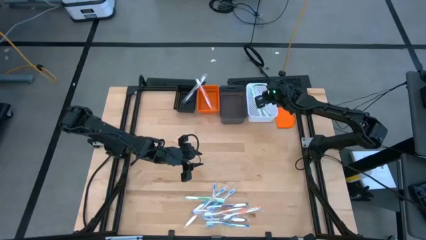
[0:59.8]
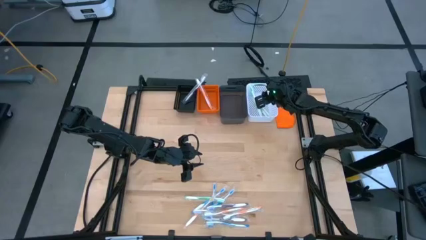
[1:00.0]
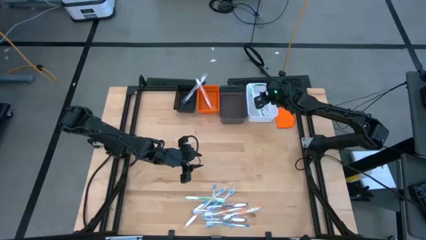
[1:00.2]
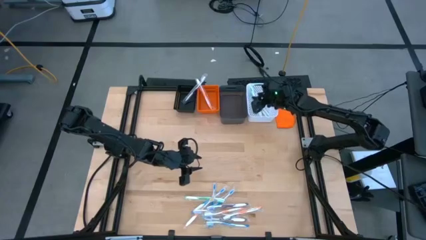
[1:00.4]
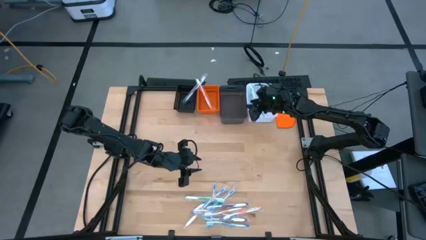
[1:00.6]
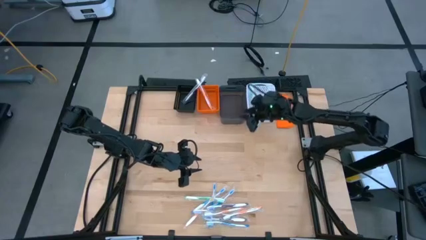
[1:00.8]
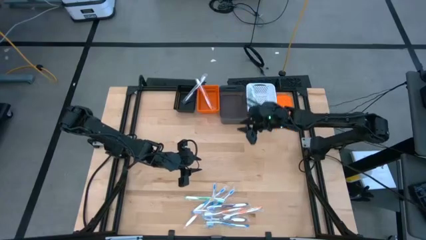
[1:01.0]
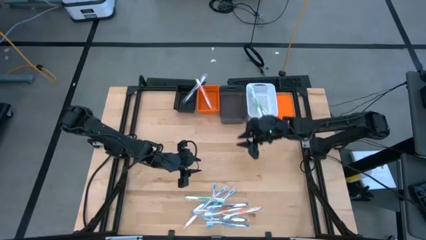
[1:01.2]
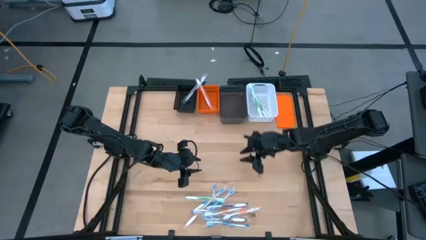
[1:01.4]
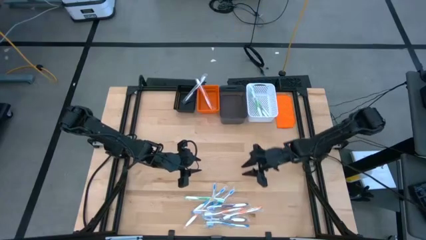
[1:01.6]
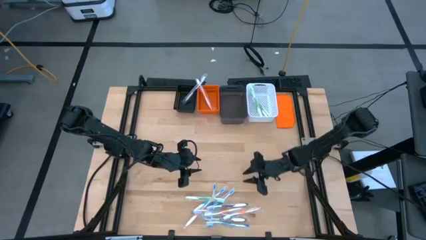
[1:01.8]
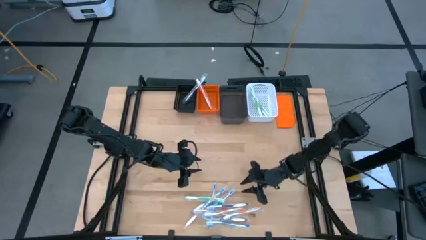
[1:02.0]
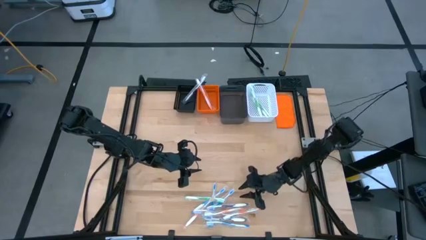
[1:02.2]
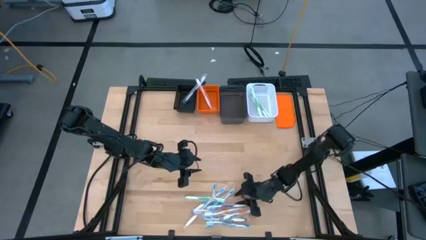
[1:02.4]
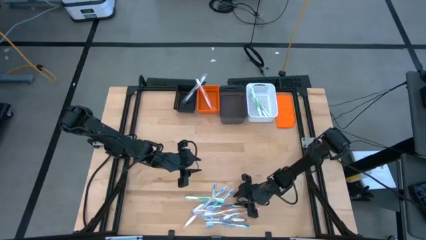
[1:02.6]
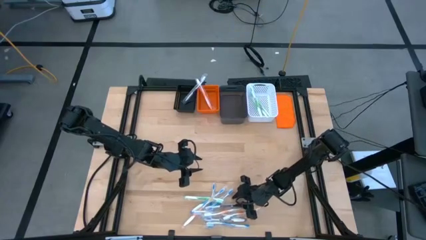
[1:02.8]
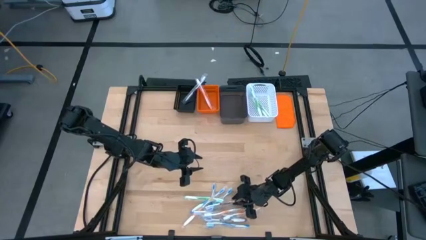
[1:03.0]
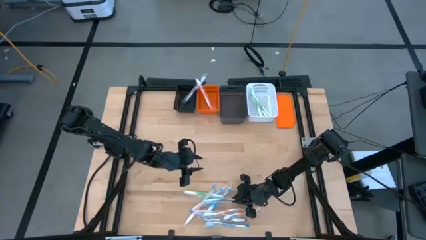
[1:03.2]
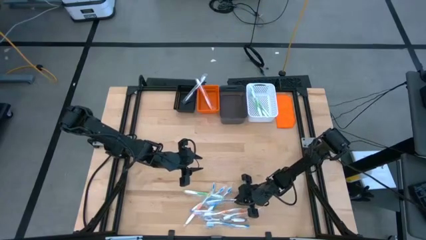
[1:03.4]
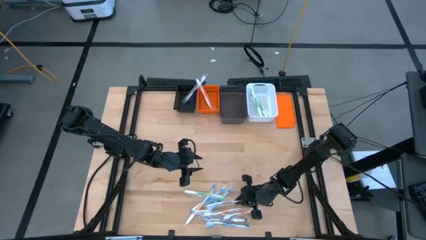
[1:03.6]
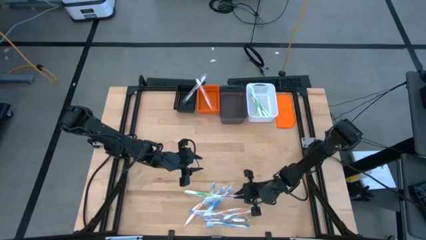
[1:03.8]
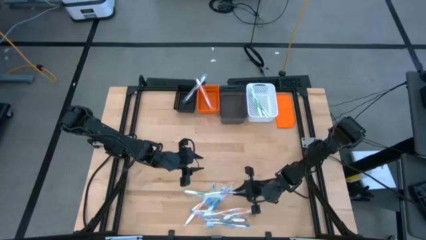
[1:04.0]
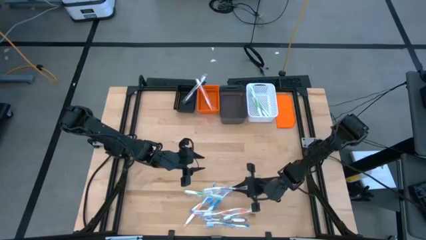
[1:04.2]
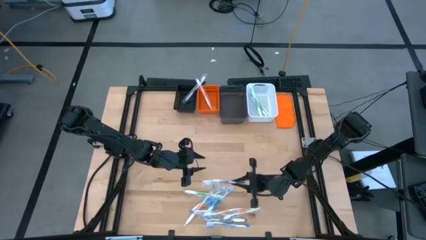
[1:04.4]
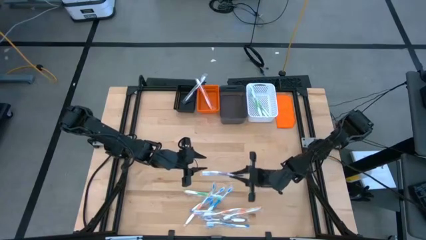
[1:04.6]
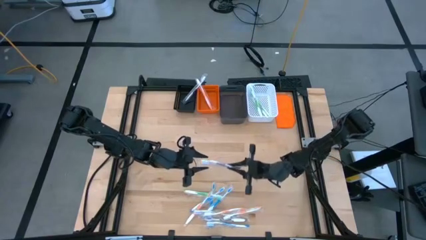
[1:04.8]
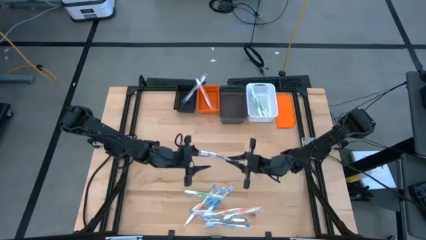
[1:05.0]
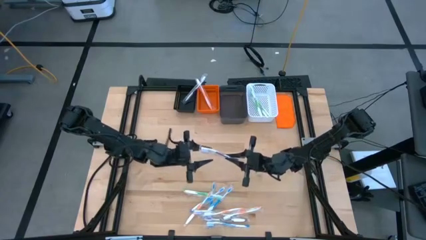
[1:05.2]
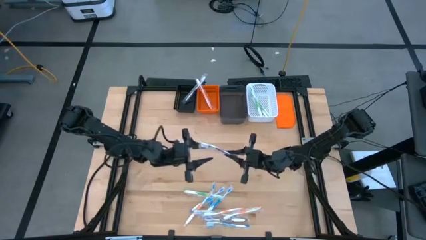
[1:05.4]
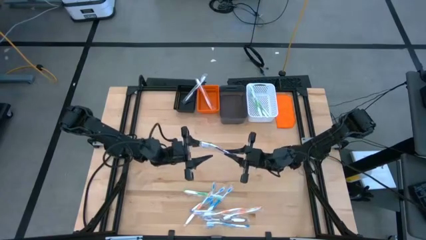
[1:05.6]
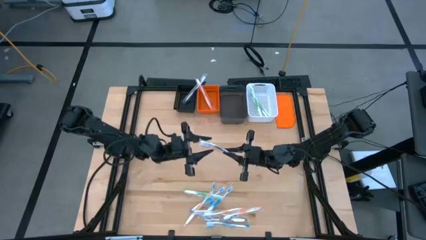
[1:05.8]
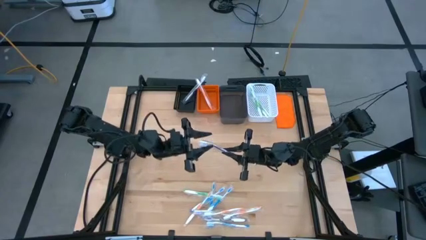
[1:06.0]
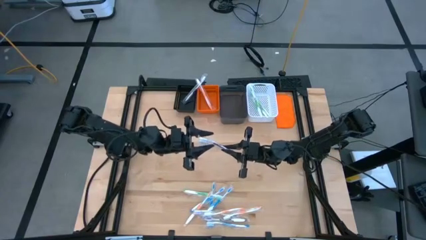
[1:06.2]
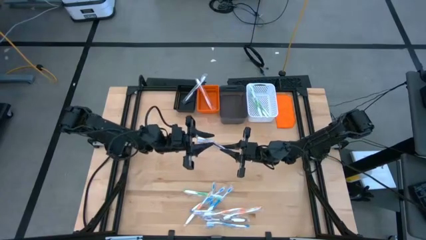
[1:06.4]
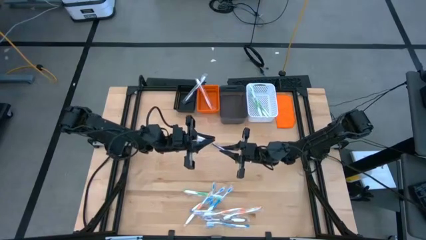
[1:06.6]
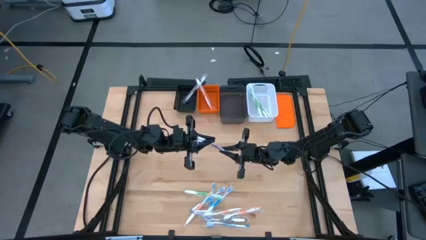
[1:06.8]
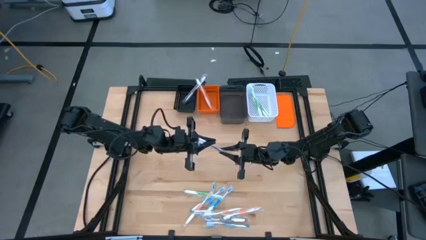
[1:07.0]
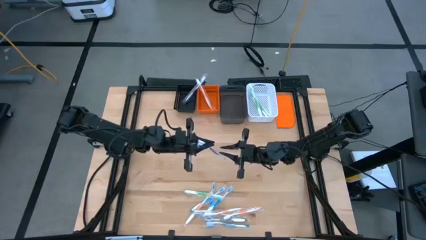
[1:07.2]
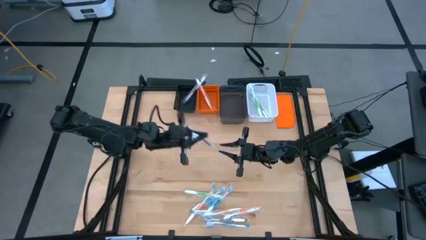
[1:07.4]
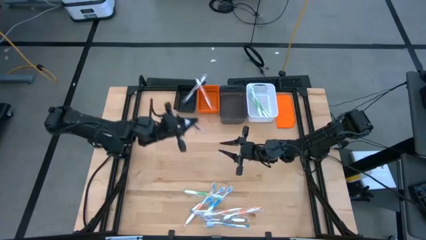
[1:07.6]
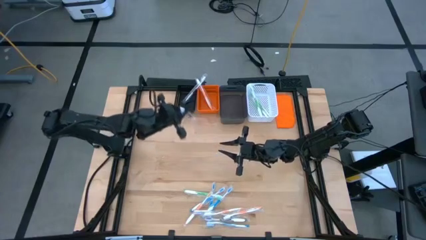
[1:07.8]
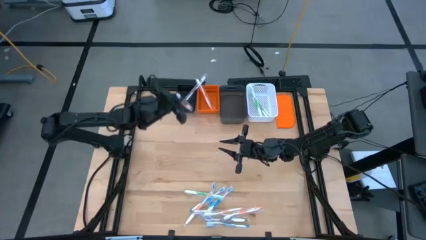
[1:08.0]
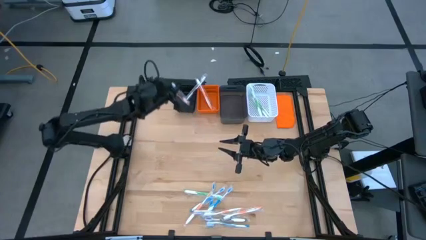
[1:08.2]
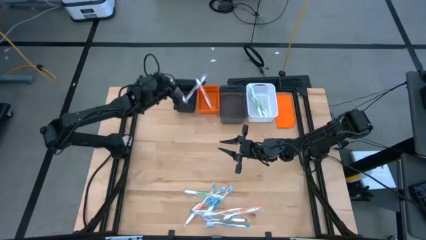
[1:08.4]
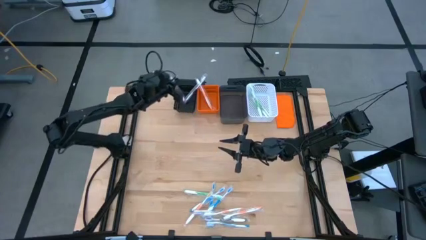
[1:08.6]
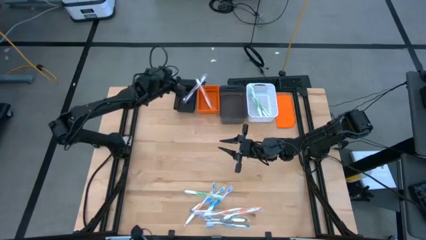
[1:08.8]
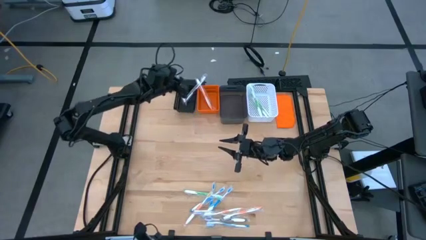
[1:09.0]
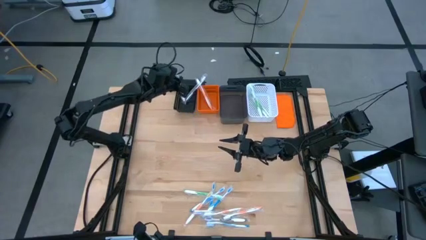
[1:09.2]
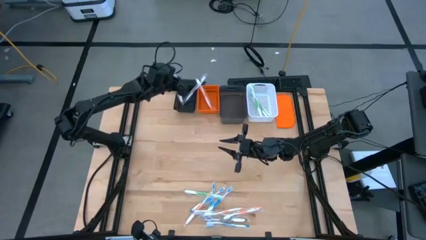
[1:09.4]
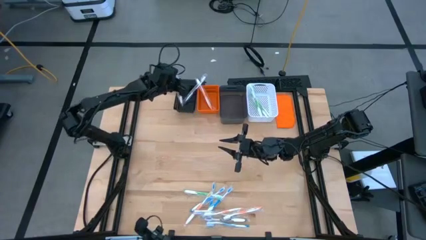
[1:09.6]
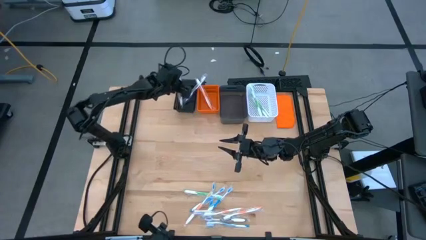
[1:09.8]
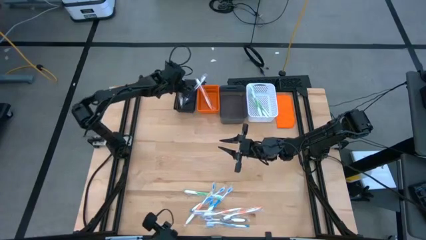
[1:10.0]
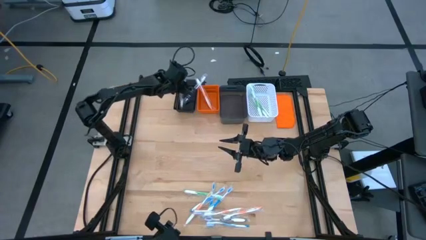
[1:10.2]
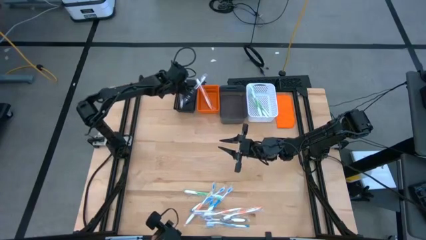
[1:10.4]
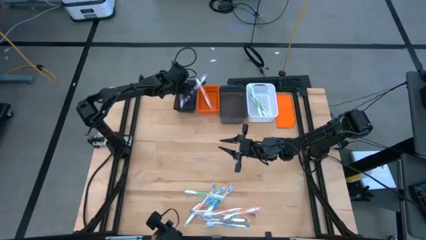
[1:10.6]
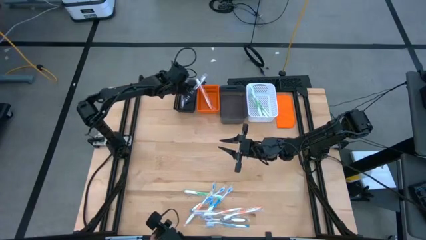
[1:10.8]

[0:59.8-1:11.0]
Task: Pick & Place Toothbrushes
Put the purple toothbrush into the black basket

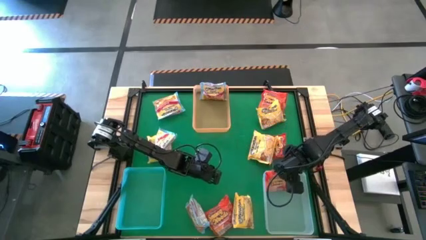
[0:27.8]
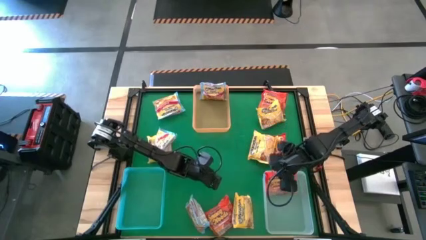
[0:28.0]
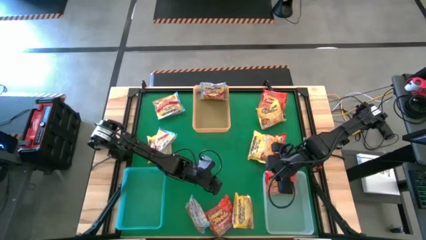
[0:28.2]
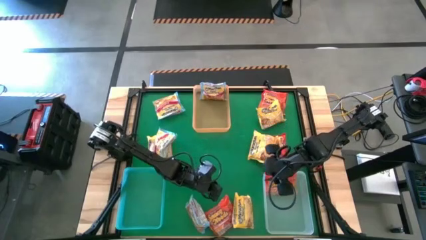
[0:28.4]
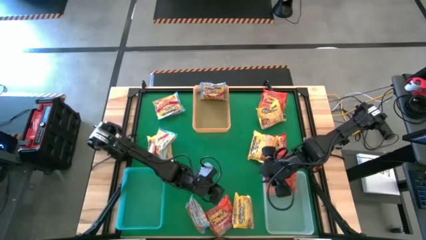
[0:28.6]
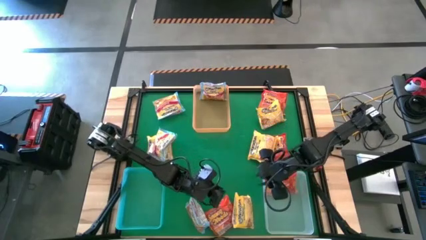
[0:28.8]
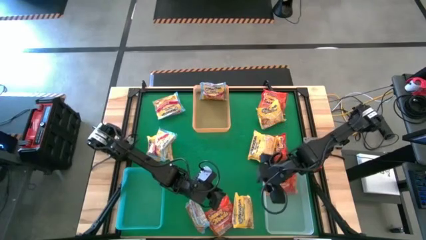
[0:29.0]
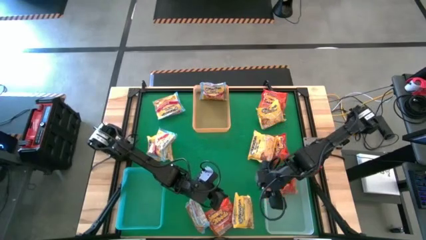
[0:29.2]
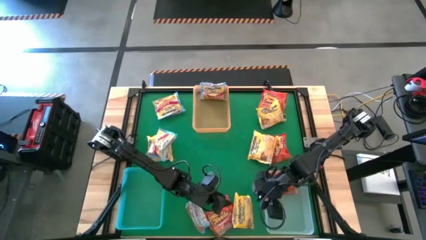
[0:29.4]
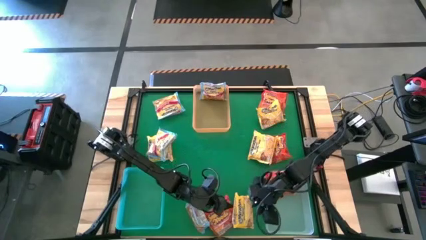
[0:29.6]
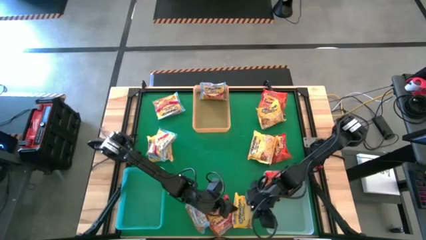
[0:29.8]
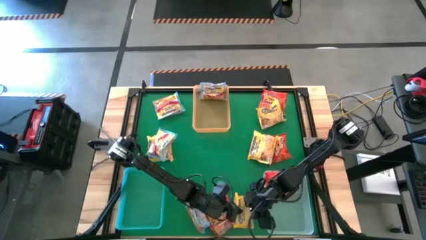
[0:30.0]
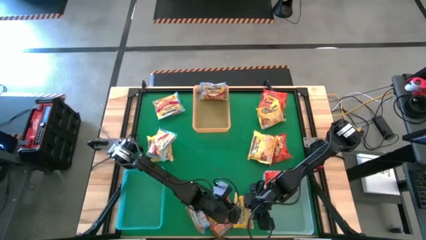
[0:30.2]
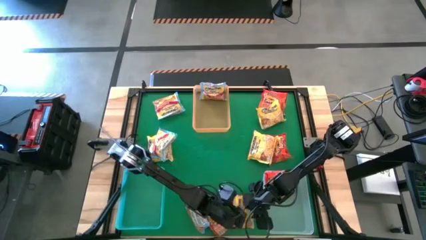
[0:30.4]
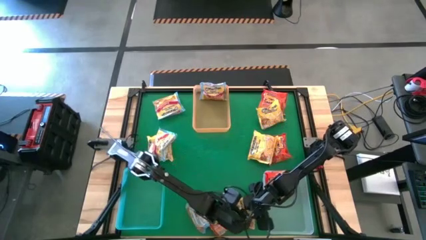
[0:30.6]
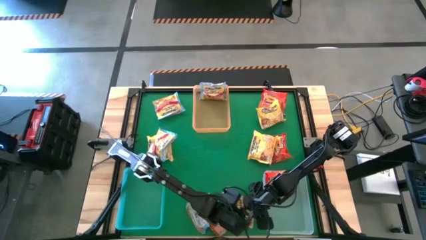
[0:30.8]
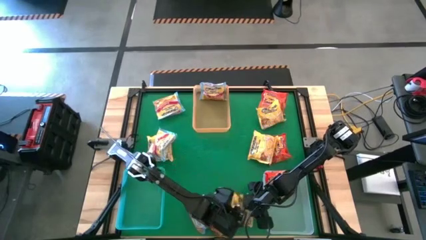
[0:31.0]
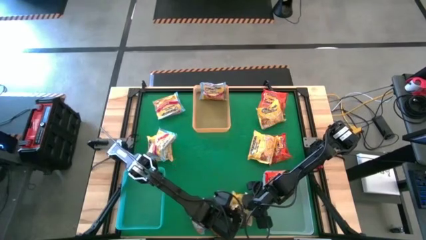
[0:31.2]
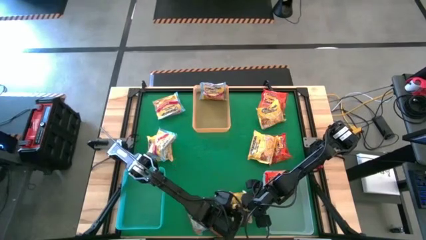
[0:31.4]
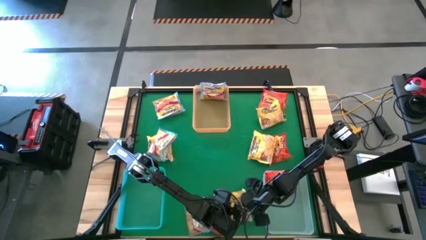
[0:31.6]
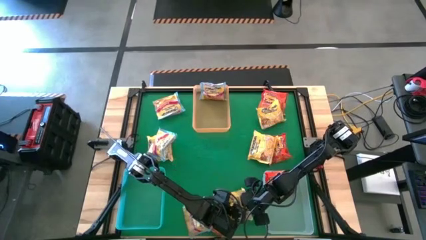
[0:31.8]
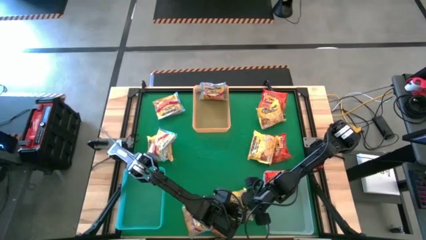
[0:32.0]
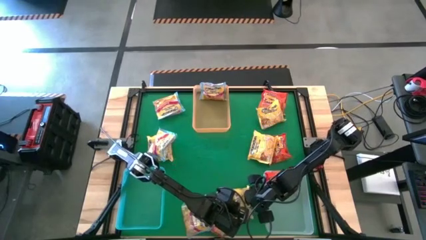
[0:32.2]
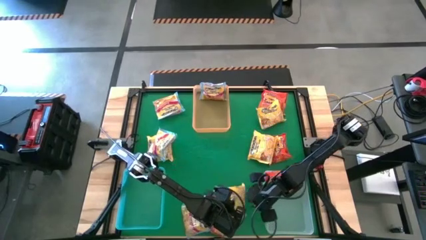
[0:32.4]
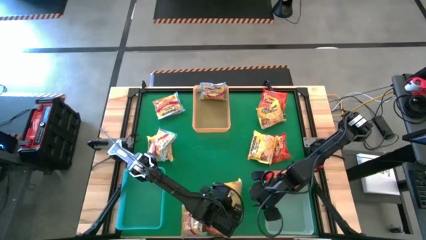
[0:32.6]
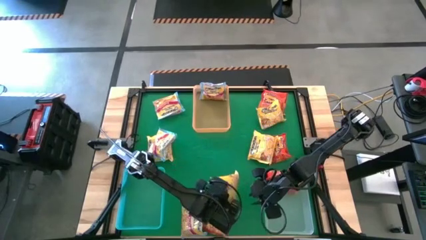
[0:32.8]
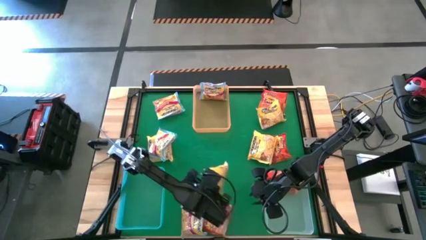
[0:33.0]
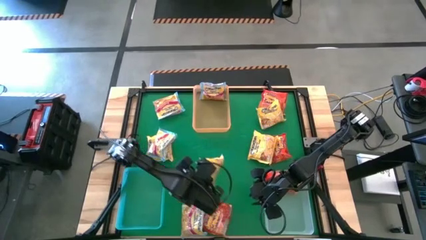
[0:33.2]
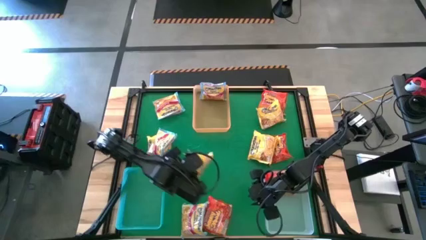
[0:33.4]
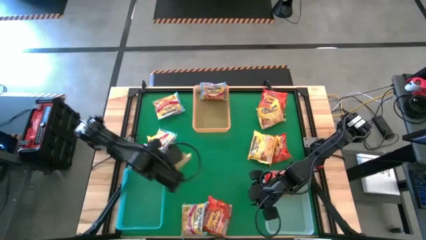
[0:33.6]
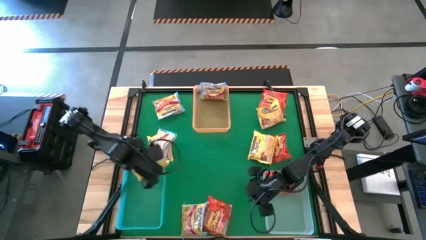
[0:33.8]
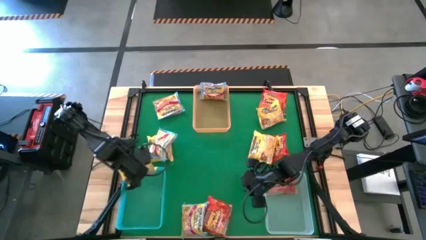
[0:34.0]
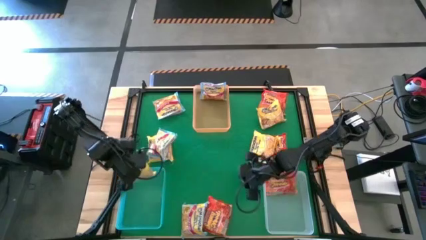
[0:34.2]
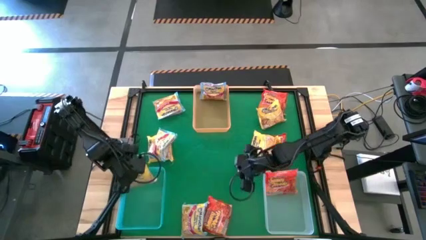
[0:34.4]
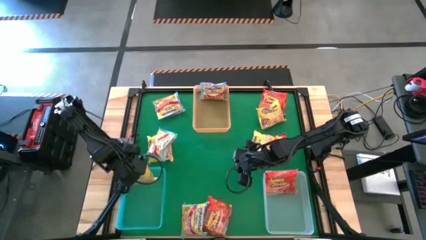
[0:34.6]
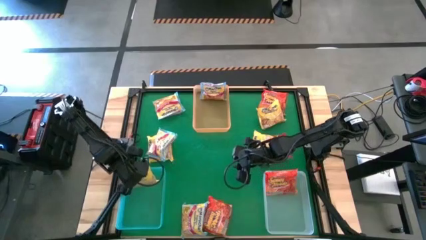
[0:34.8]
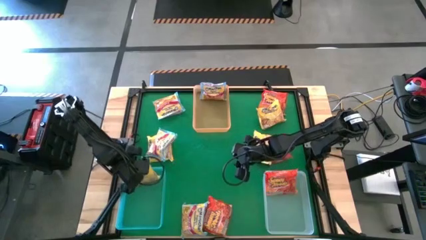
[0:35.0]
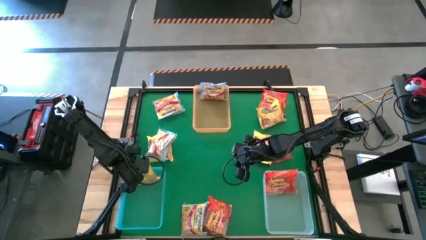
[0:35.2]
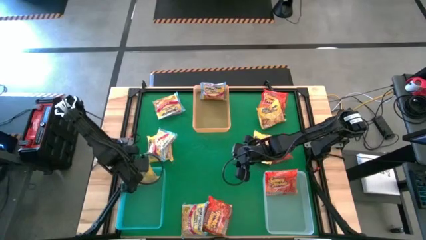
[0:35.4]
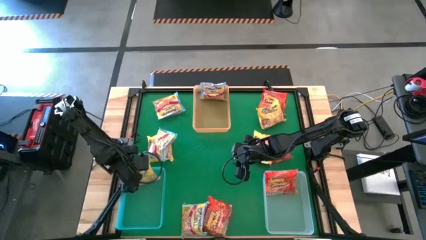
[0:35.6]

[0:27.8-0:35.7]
Task: Sort Maruchan noodles
Put the yellow noodle pack into the blue bin
